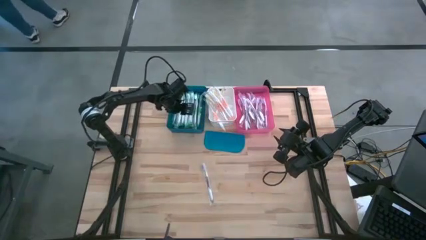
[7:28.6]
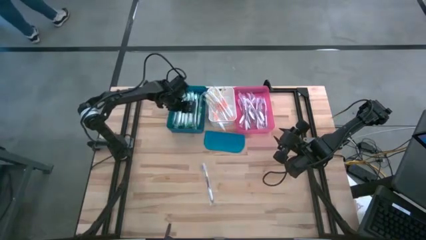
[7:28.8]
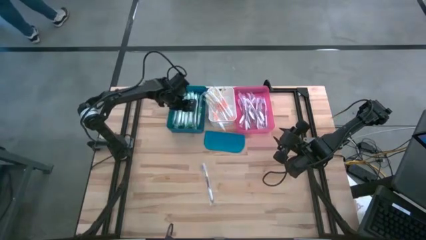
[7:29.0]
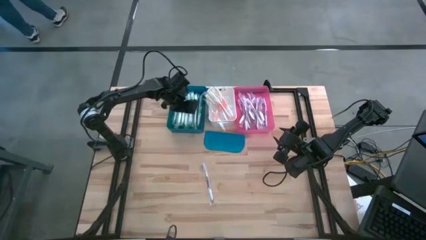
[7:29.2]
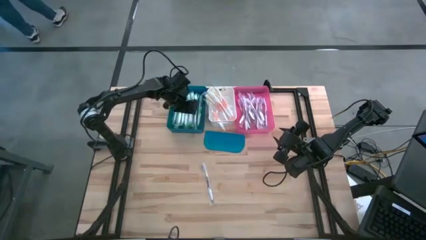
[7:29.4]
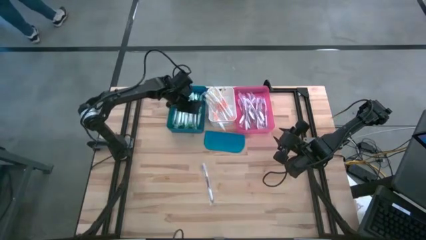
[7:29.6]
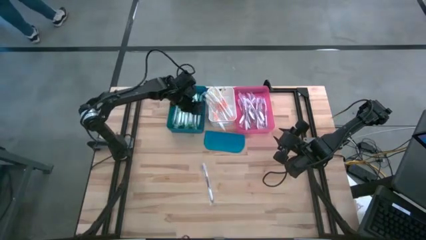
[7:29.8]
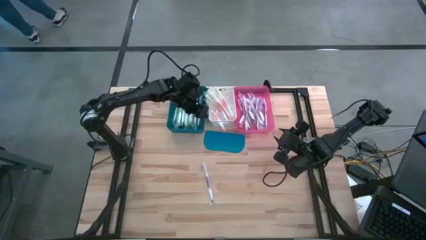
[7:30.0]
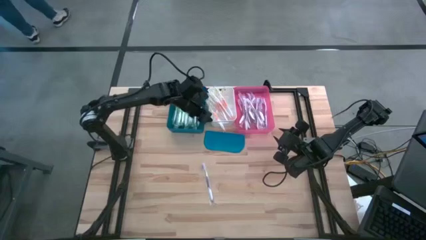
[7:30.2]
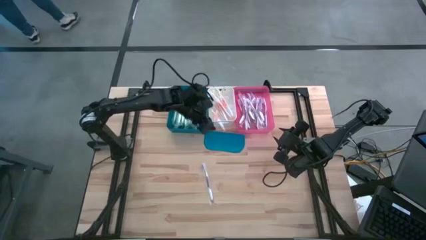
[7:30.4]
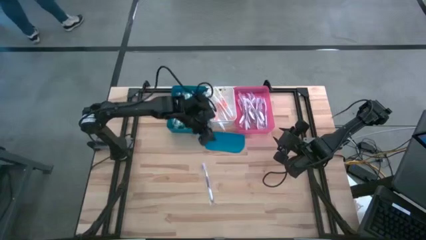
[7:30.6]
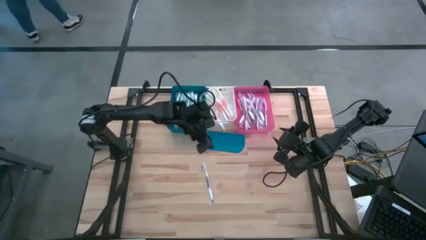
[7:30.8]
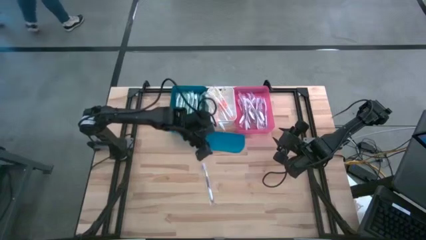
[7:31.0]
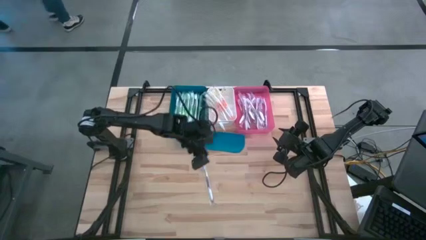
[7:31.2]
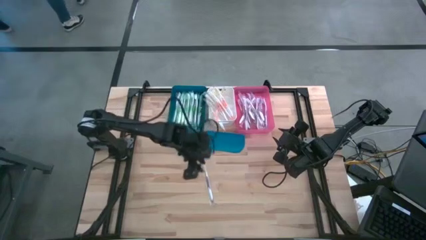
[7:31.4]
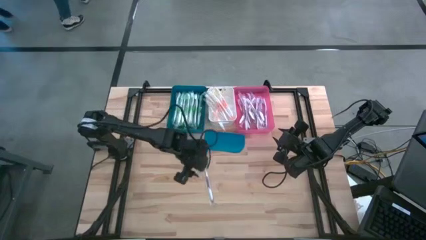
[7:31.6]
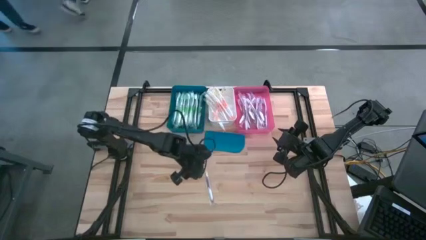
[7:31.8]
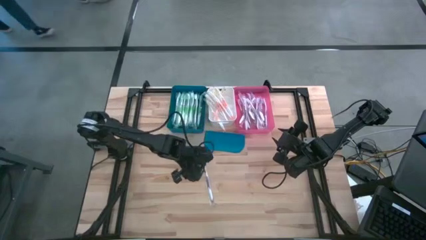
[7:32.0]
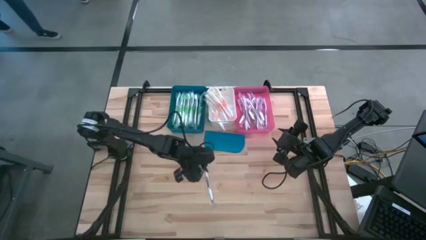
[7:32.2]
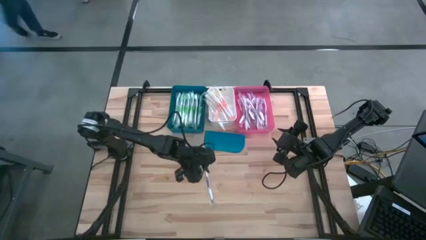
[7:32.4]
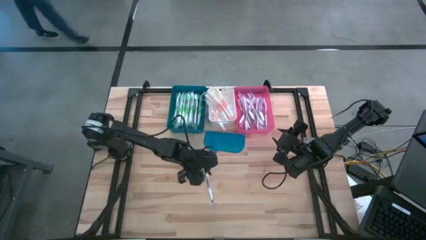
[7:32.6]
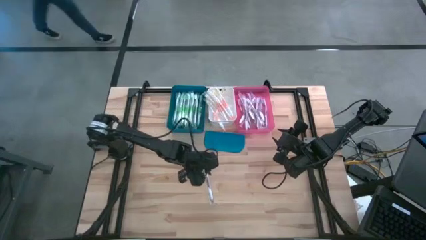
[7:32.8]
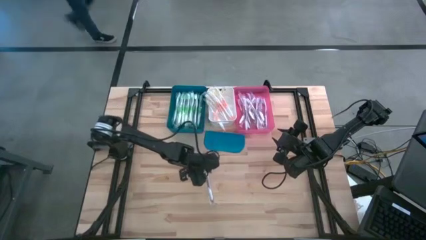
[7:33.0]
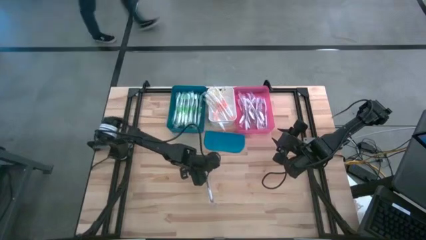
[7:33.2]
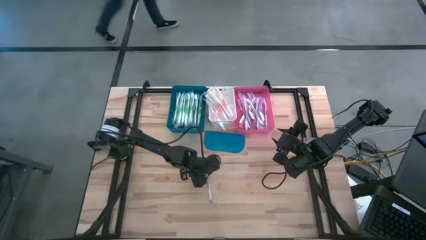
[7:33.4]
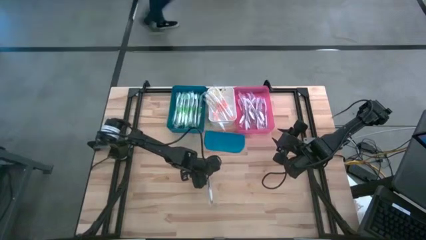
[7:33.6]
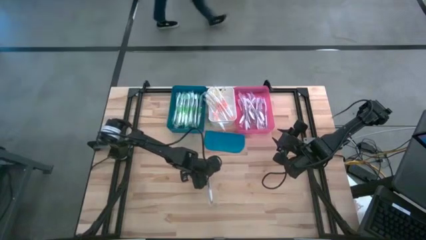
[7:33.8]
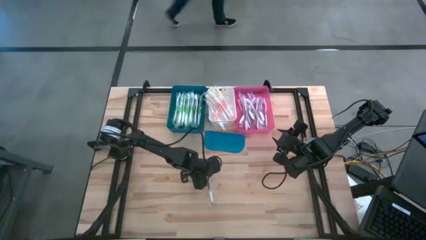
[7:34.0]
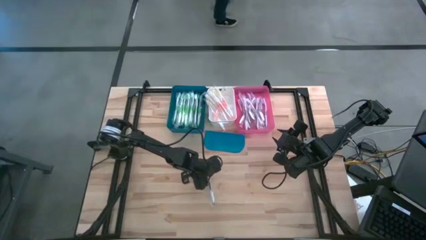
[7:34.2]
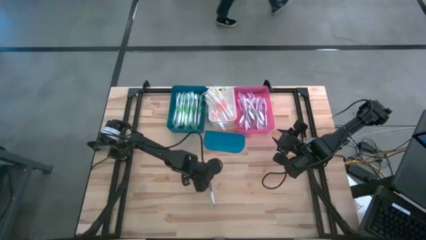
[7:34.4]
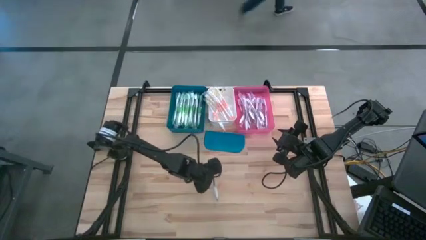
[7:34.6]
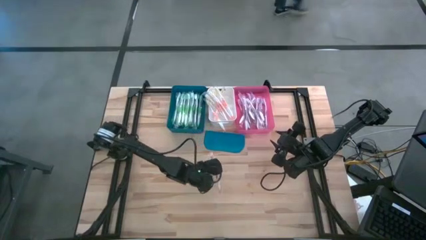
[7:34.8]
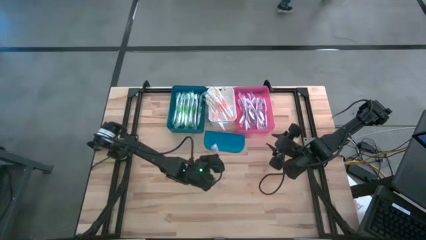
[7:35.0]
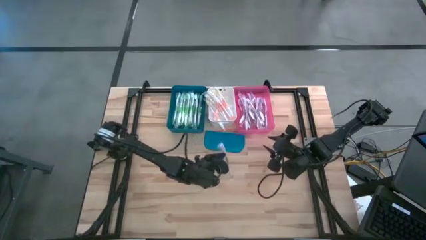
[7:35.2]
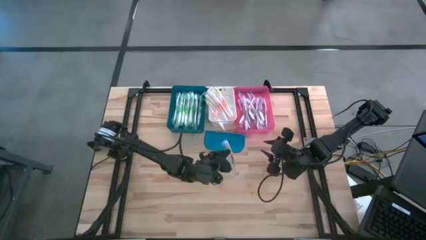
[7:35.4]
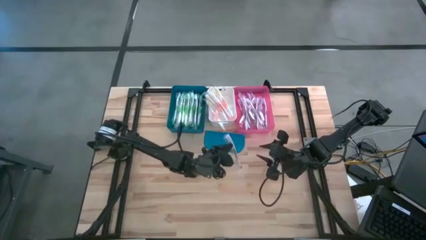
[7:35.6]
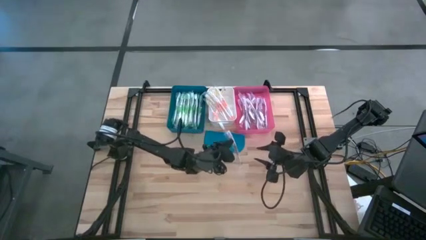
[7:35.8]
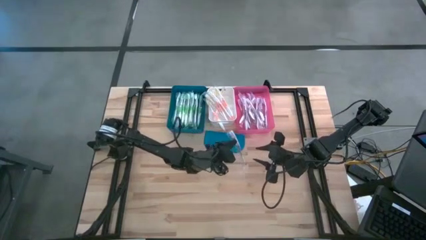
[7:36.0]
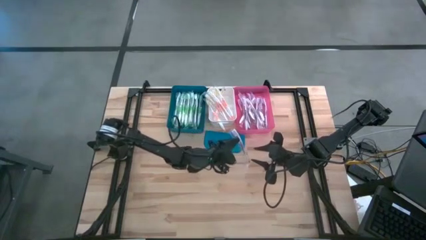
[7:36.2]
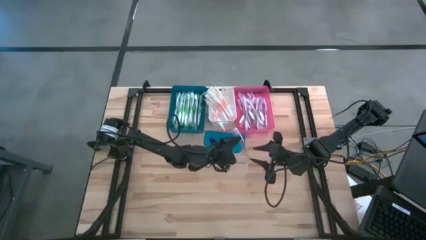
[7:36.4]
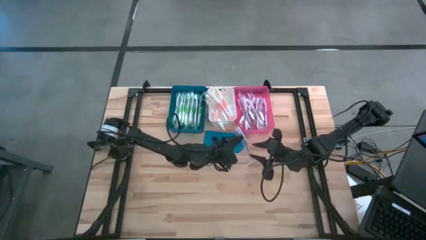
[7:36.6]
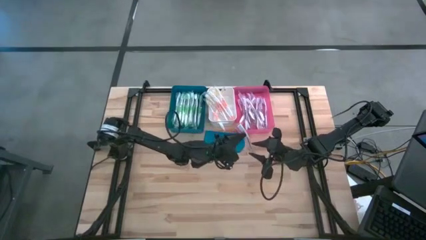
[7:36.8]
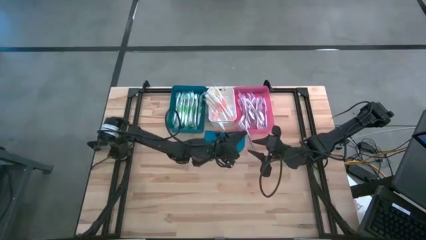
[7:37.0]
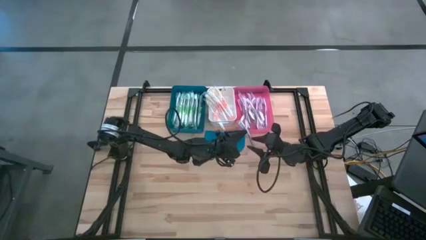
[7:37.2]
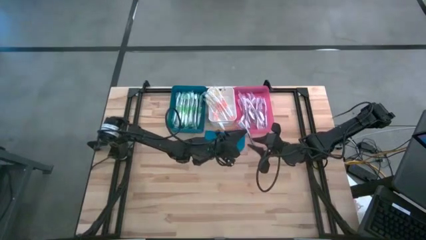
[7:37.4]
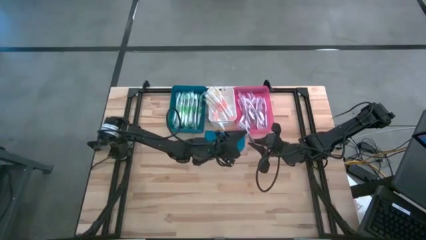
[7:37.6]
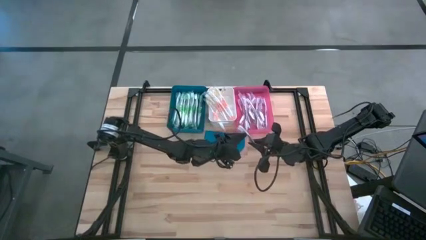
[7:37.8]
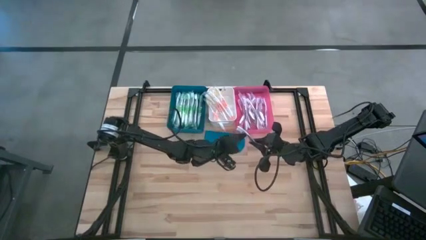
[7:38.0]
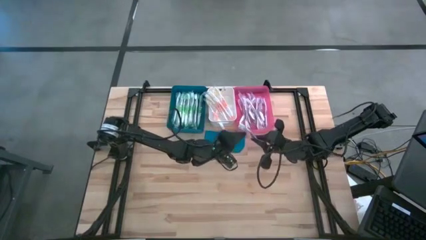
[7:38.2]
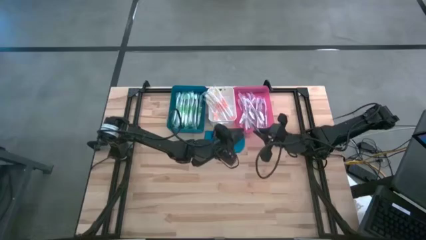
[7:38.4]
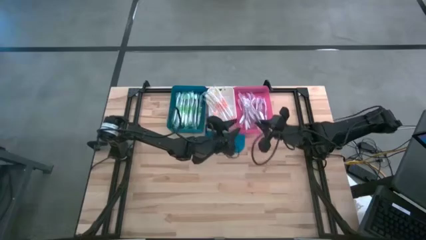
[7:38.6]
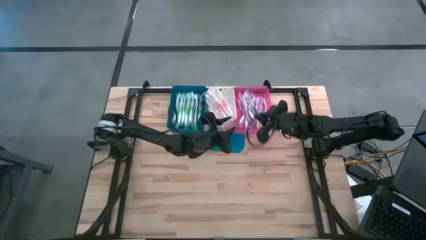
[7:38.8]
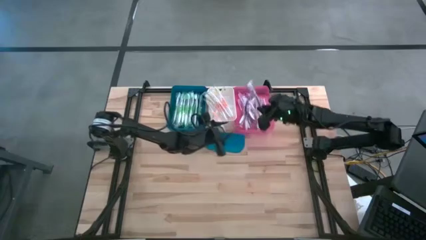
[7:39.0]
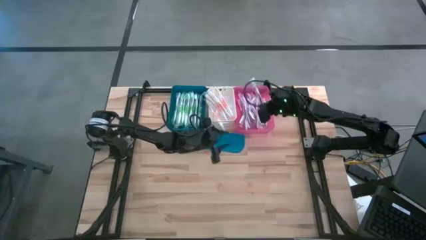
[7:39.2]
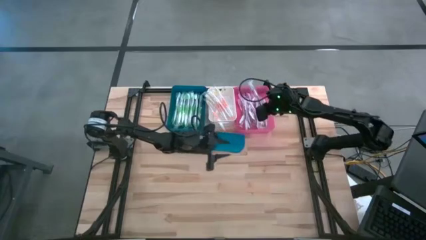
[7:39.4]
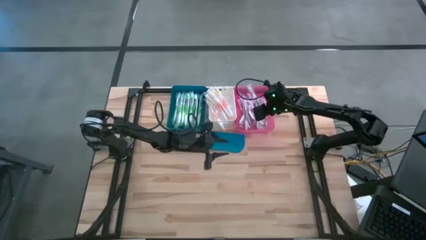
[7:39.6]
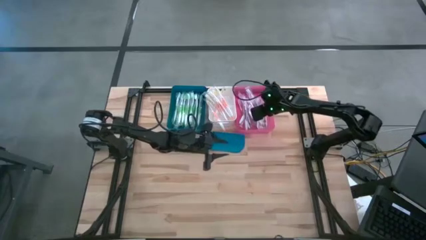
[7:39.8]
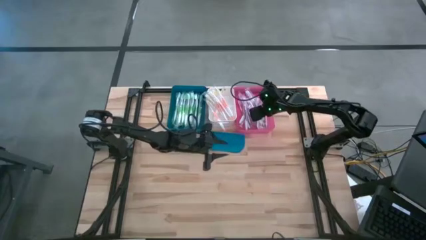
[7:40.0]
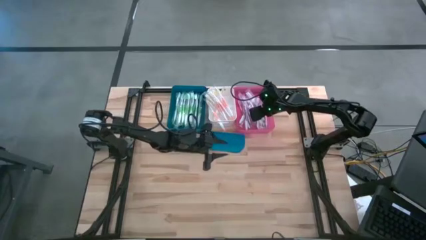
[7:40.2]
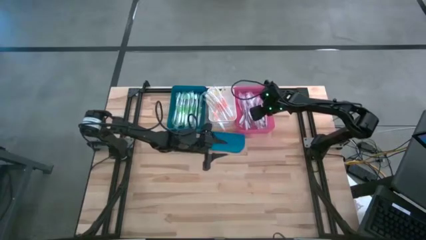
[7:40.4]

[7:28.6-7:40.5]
Task: Pick & Place Toothbrushes
Put the purple toothbrush into the pink bin

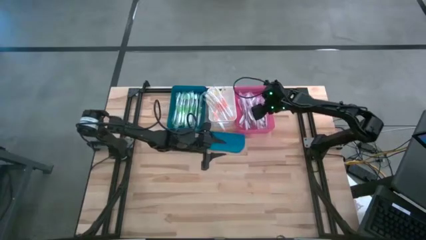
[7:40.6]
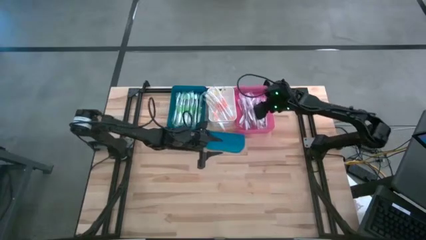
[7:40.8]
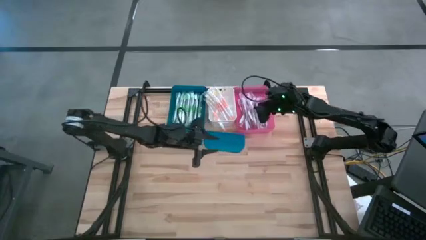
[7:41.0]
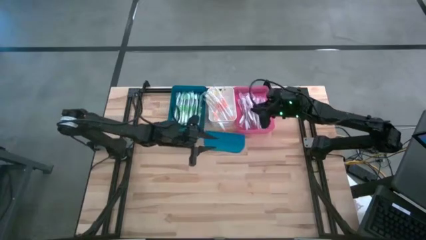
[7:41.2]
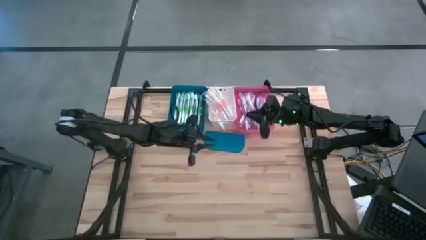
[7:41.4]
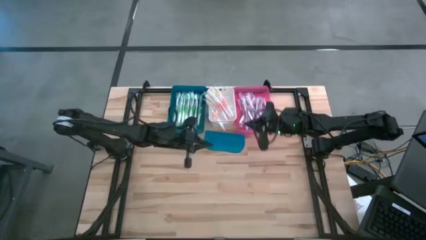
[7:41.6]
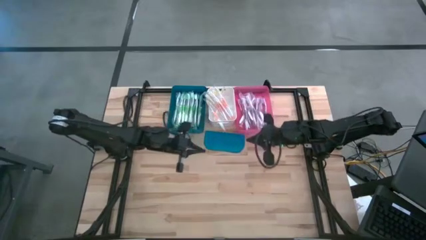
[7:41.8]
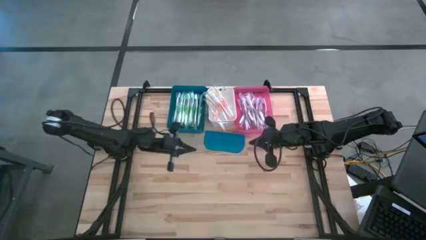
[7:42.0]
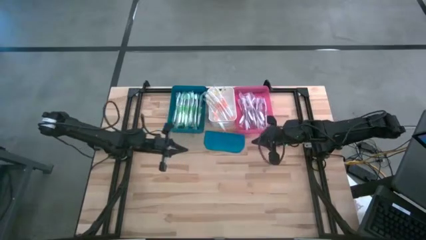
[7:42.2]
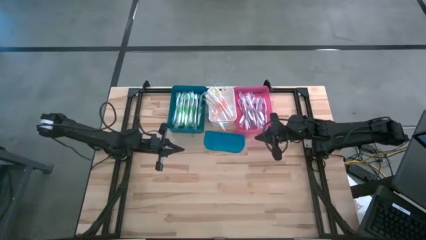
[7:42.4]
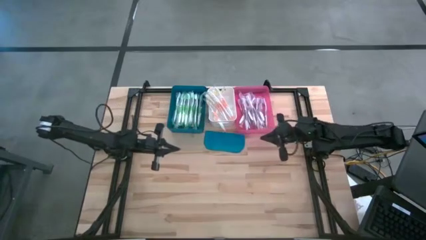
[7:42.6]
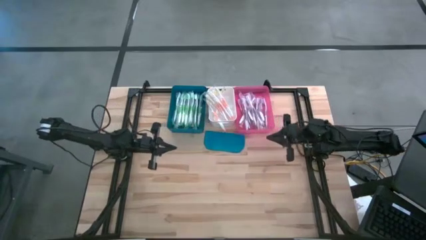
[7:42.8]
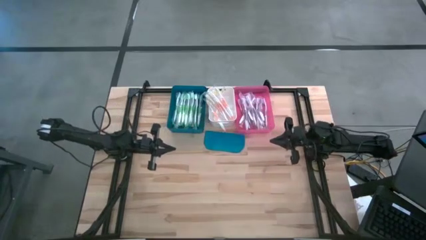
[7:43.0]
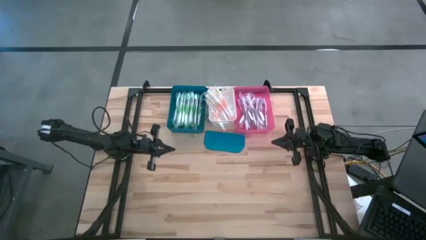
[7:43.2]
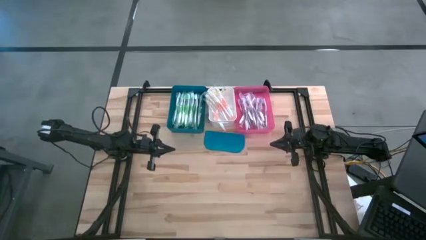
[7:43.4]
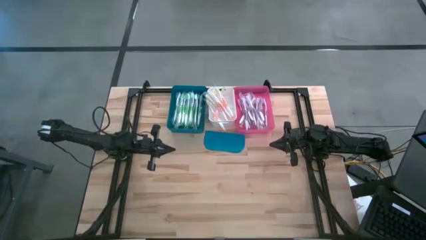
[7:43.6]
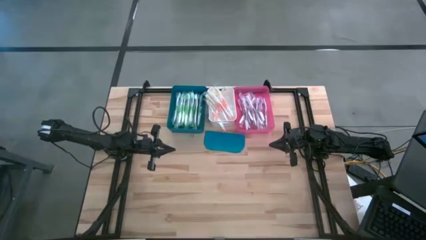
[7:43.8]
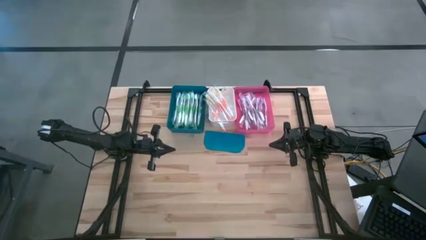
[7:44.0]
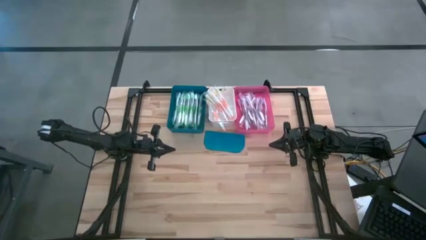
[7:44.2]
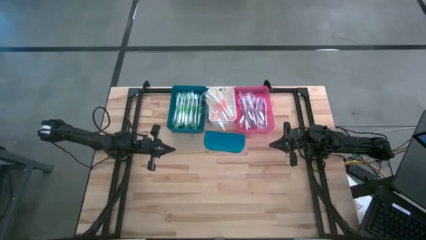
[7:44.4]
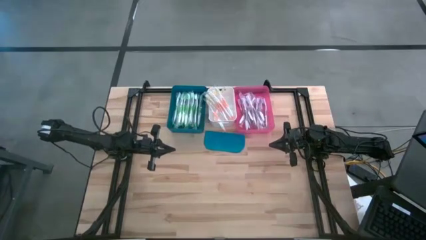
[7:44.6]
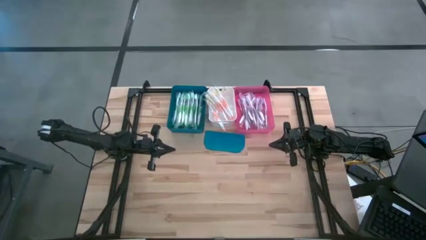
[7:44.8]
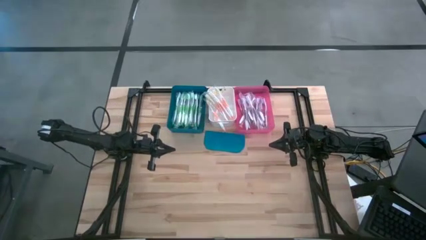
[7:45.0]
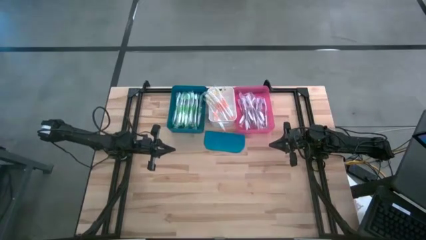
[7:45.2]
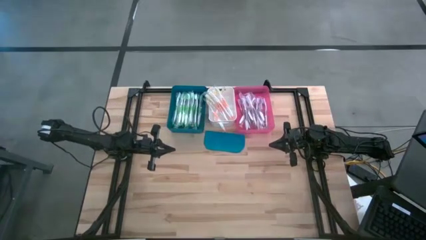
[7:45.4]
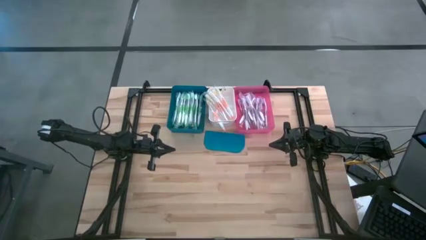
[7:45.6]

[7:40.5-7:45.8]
Return to Home Position
